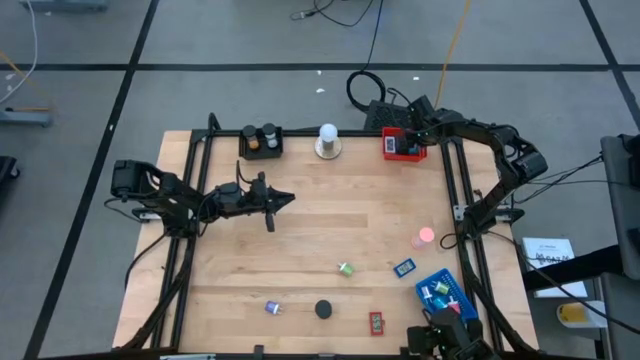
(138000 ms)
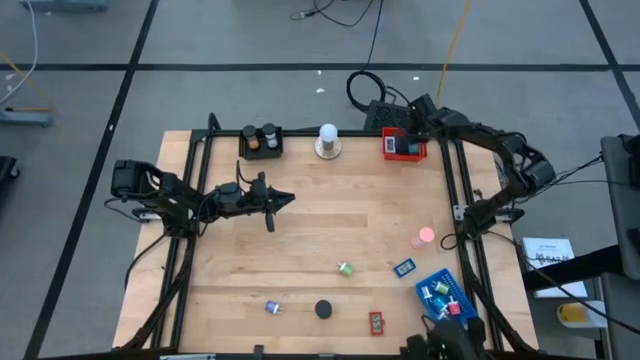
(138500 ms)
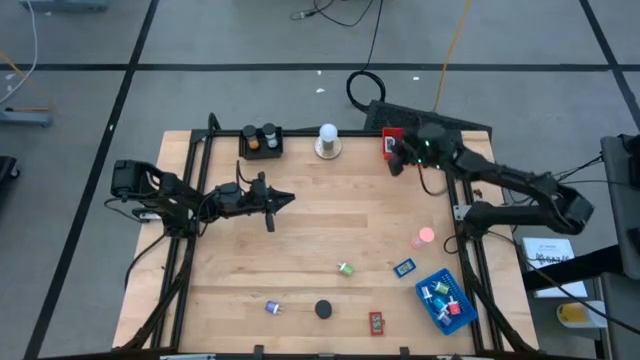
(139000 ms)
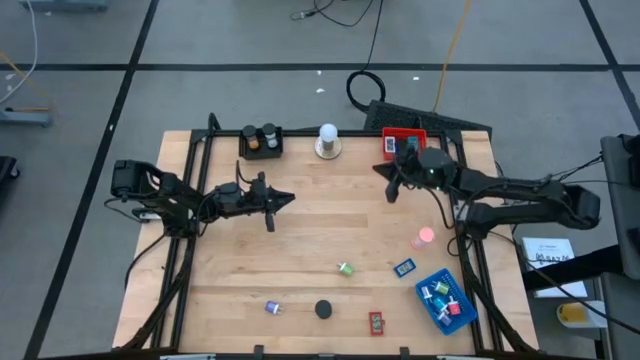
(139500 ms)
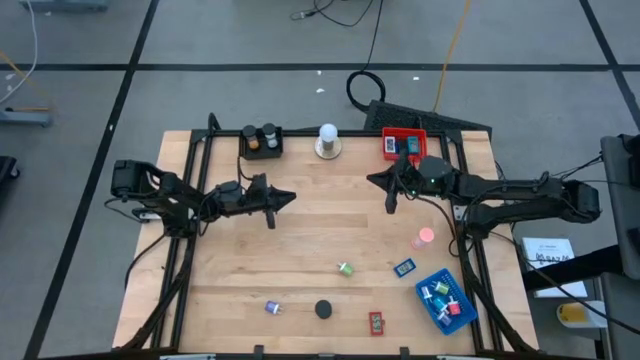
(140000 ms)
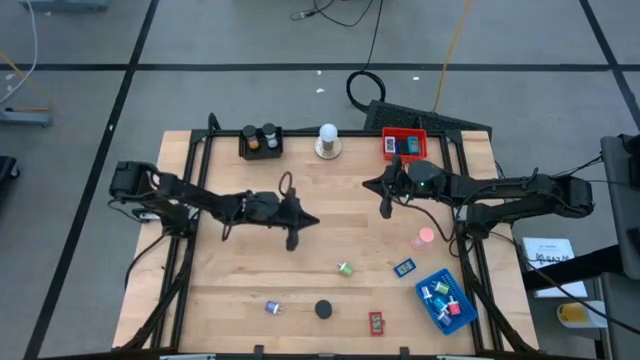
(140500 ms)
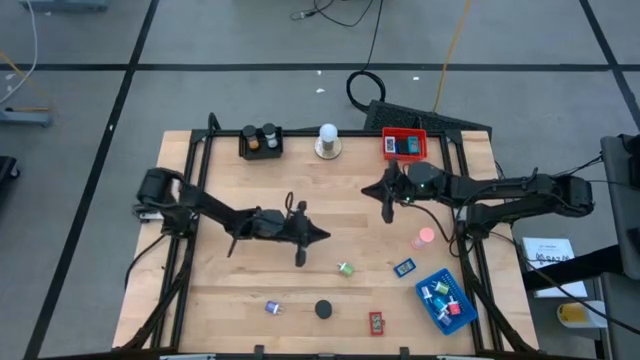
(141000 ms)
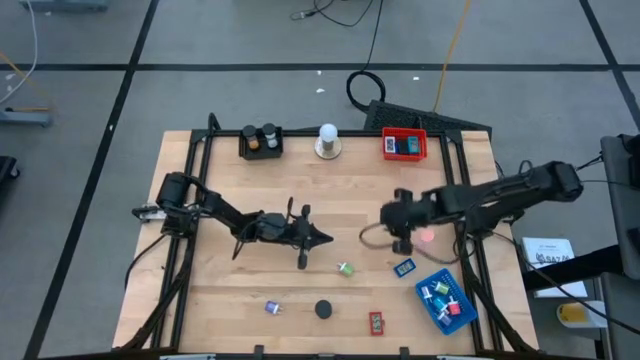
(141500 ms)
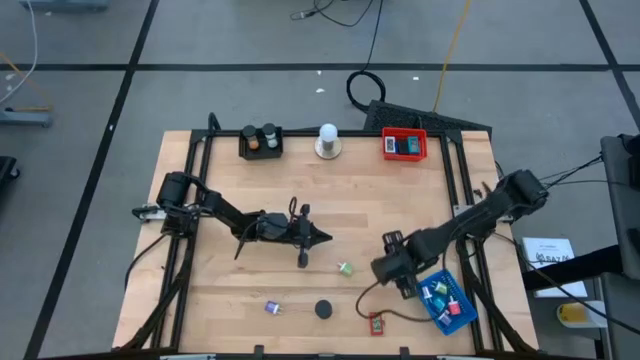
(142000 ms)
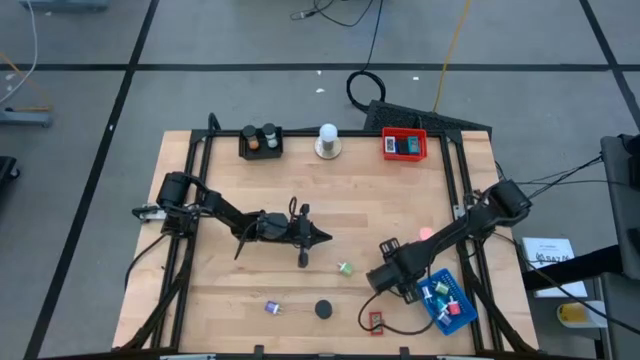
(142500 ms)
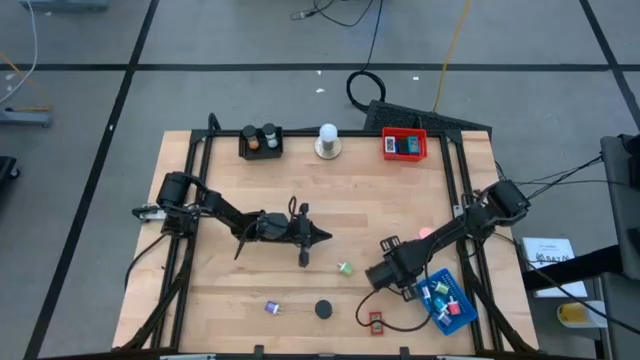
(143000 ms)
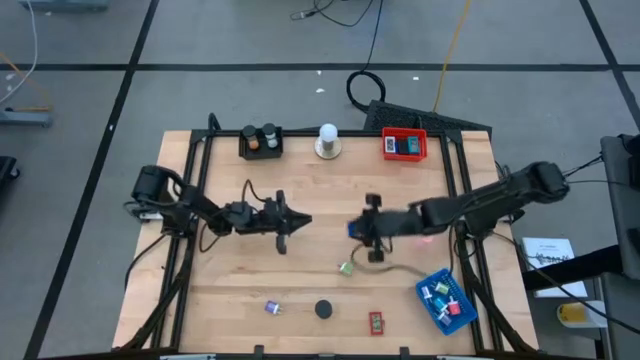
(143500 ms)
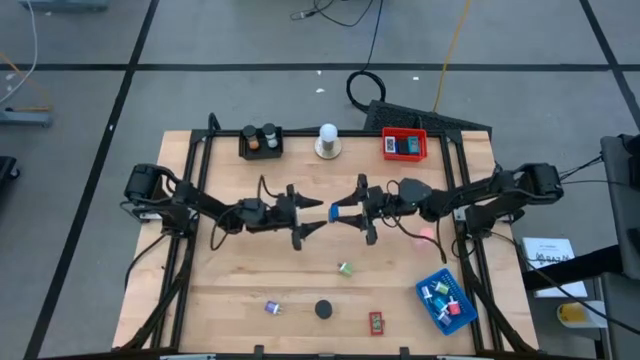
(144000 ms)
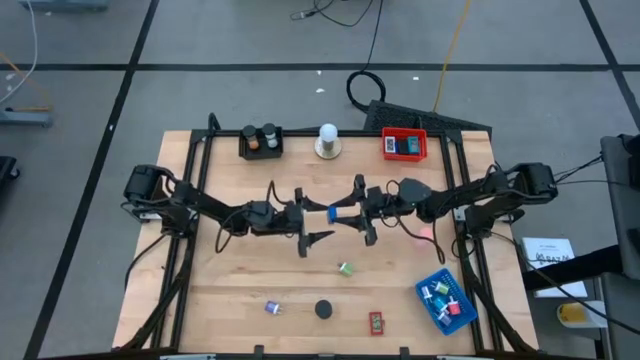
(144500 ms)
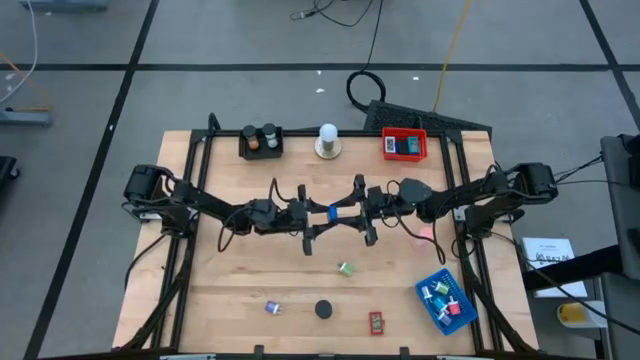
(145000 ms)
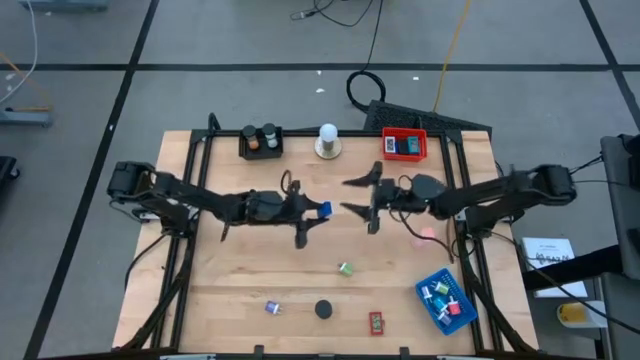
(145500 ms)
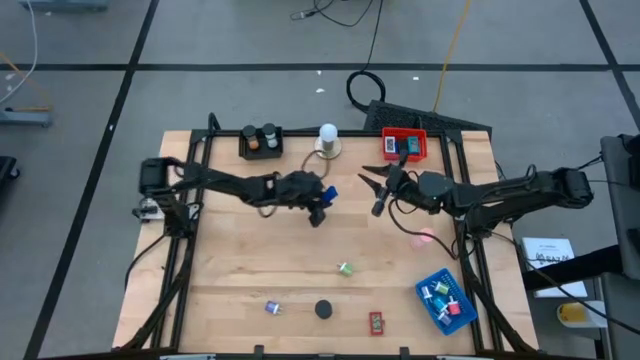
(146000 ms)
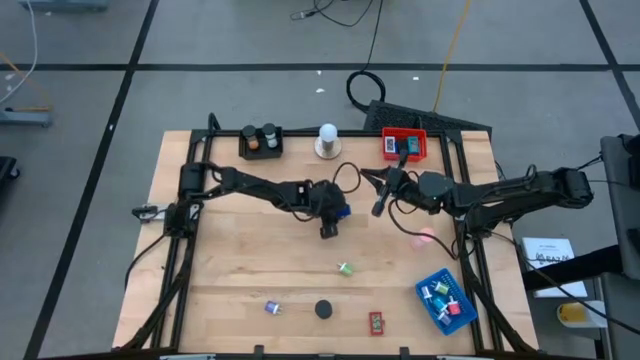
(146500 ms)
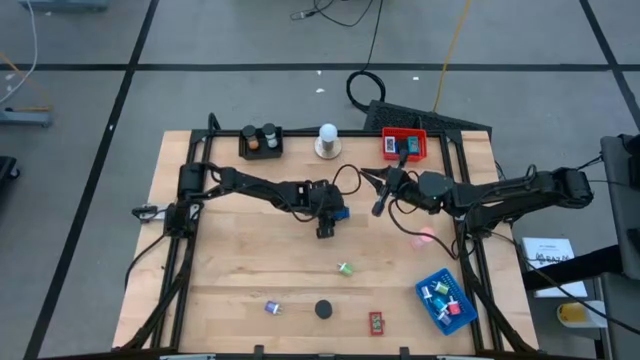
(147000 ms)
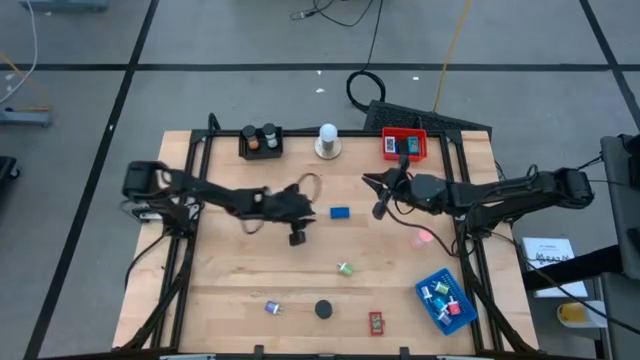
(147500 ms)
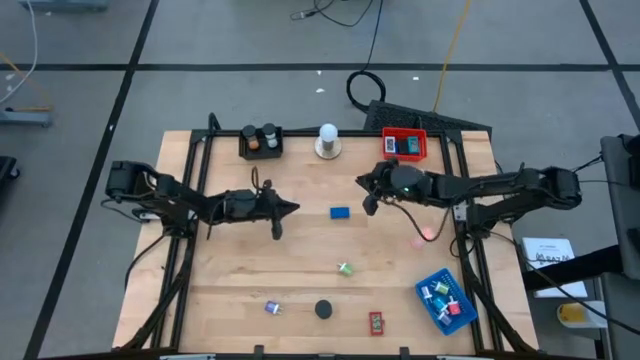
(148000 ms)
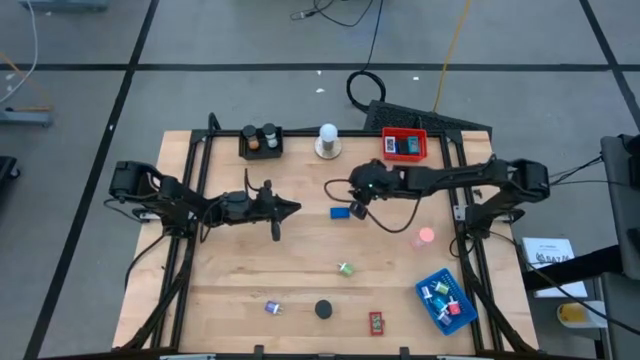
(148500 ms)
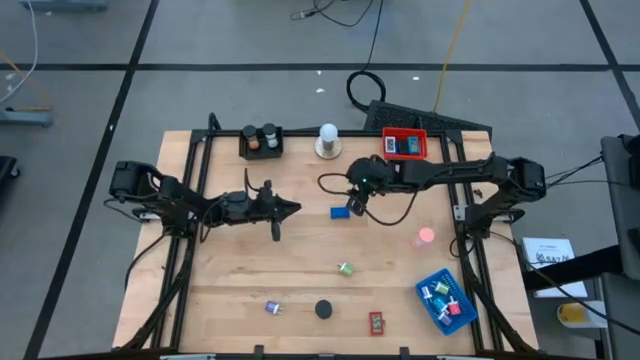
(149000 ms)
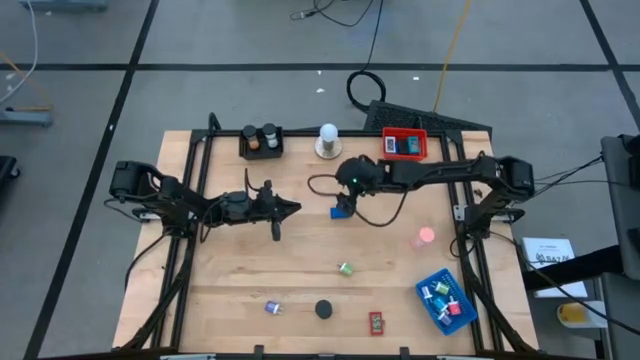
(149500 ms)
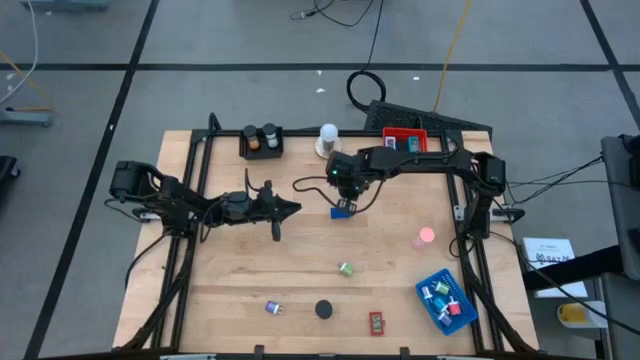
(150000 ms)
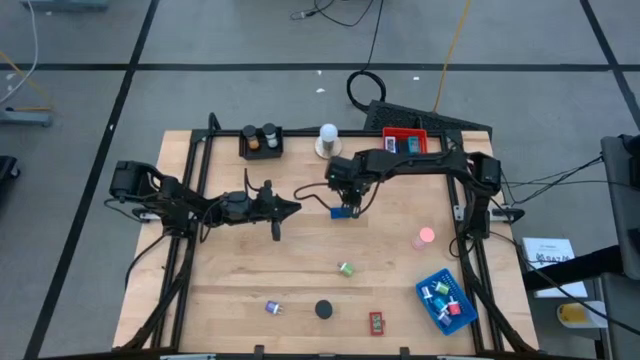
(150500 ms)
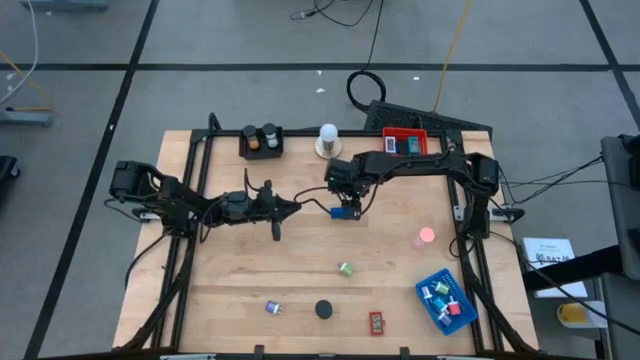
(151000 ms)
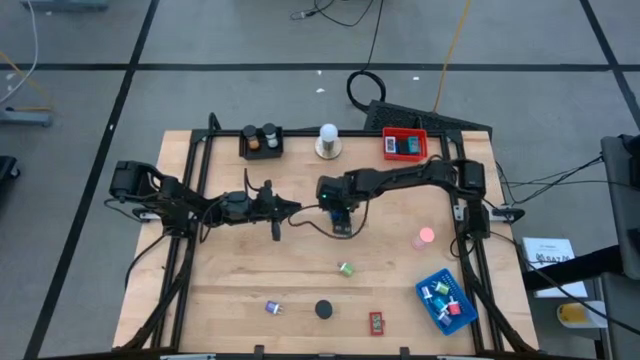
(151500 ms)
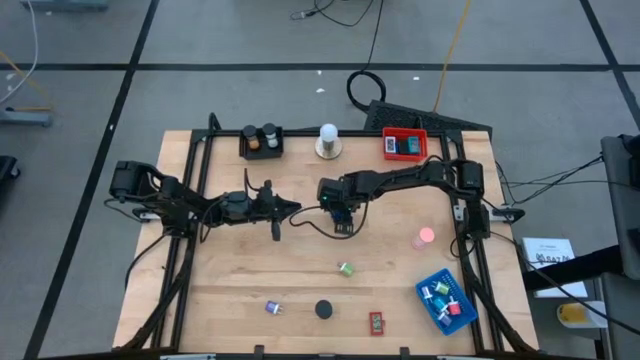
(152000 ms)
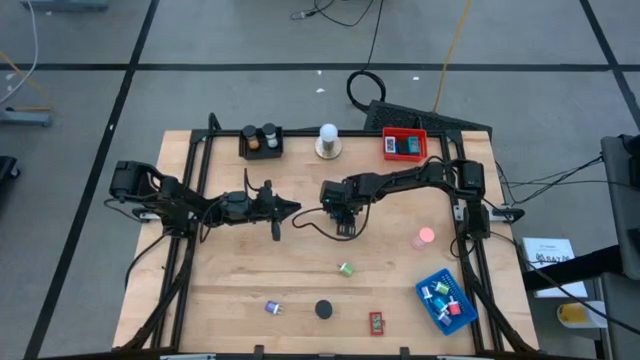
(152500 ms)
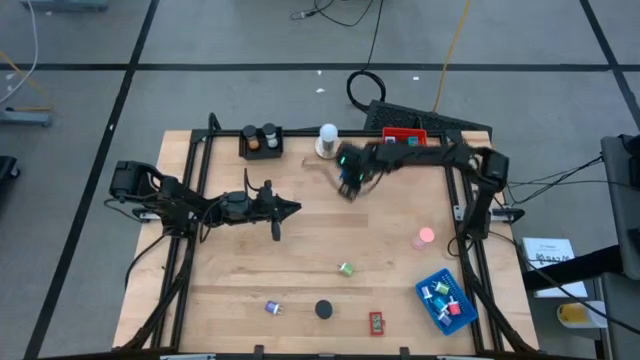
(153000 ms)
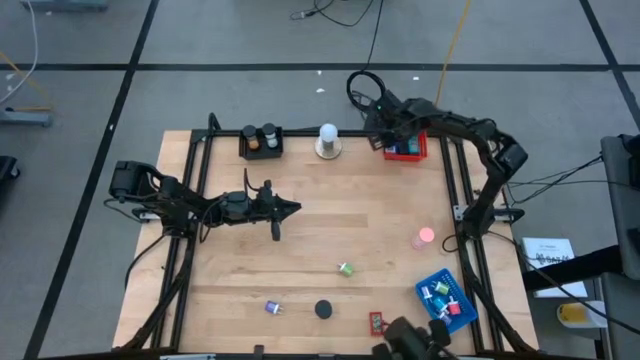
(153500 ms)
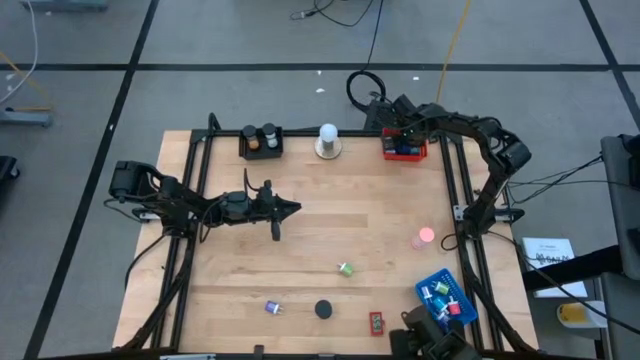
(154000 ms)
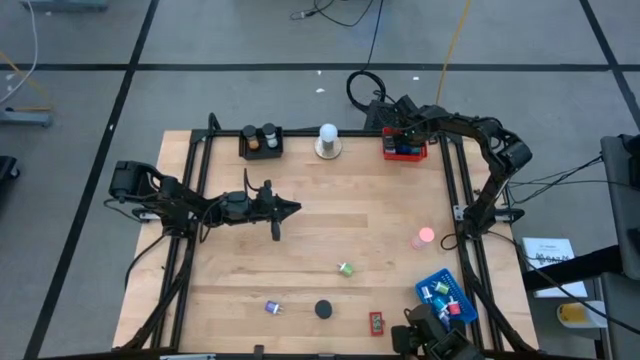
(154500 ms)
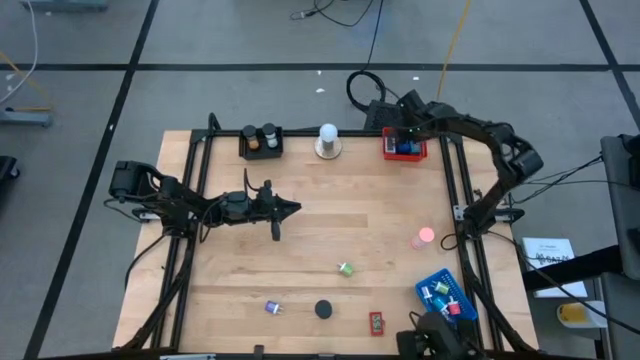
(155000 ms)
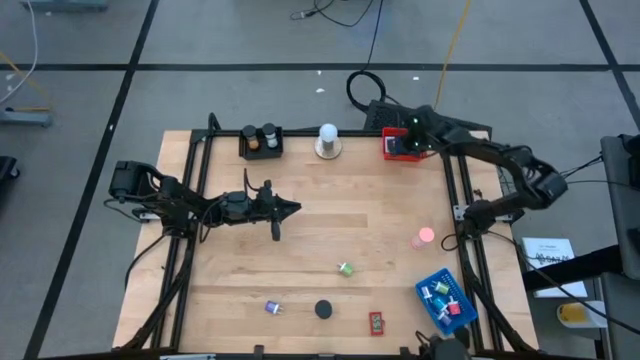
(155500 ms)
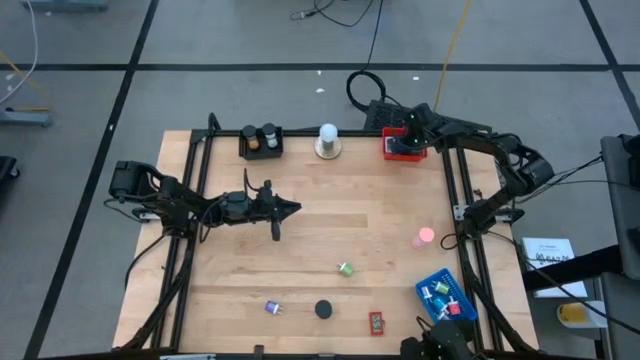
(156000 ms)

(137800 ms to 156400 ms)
Task: Pick & Place Office items
Put the blue digital timer into the red bin

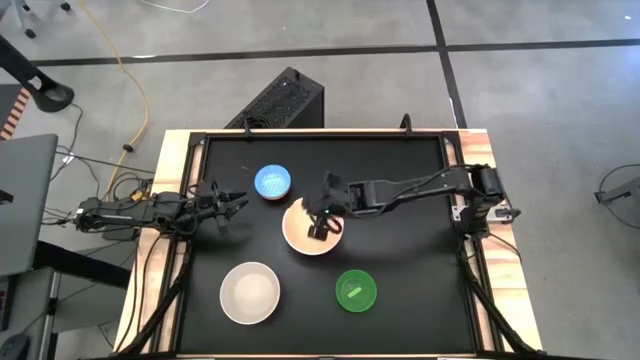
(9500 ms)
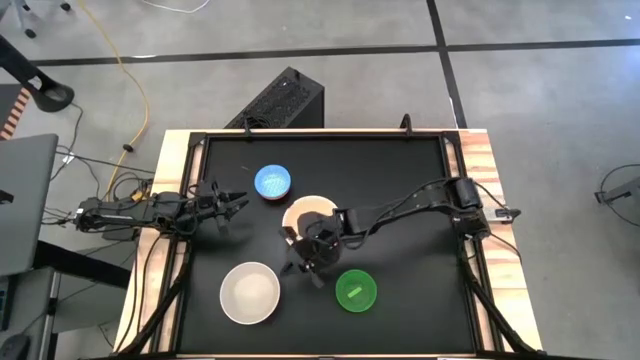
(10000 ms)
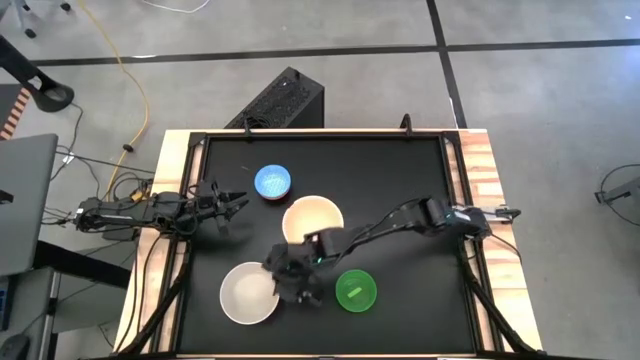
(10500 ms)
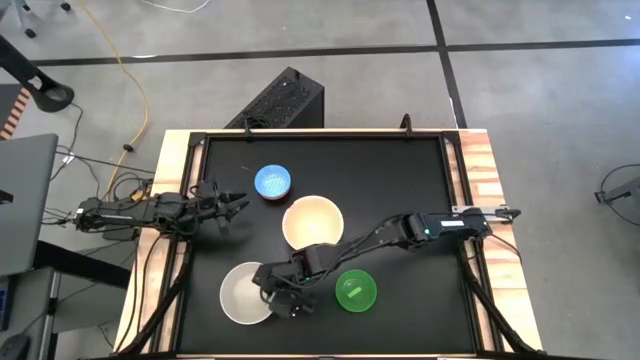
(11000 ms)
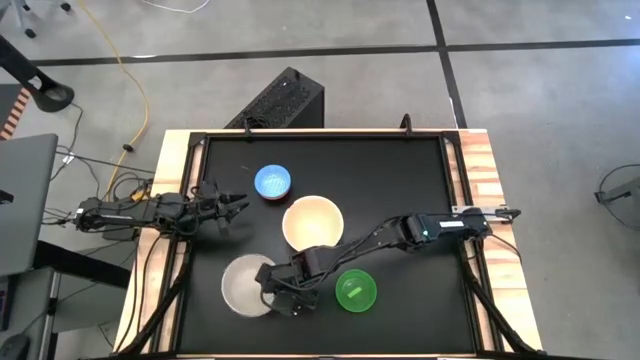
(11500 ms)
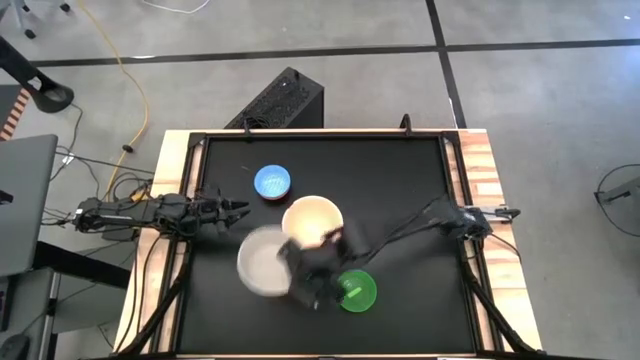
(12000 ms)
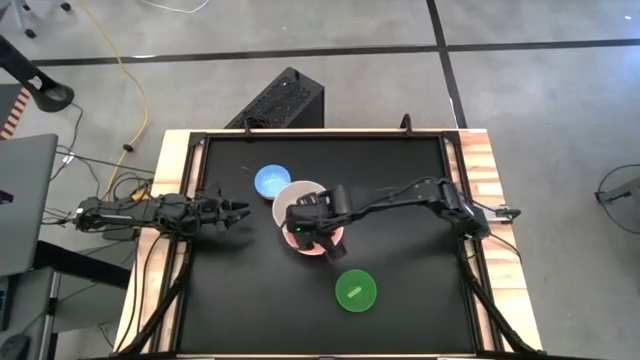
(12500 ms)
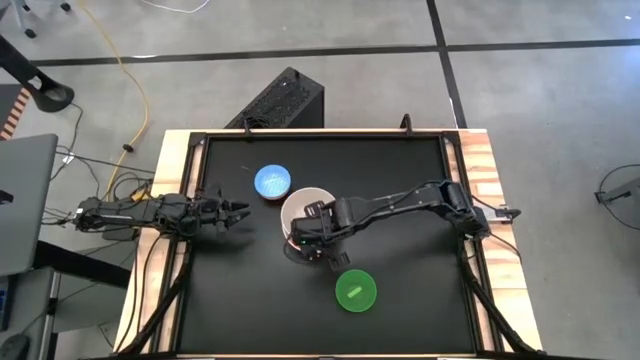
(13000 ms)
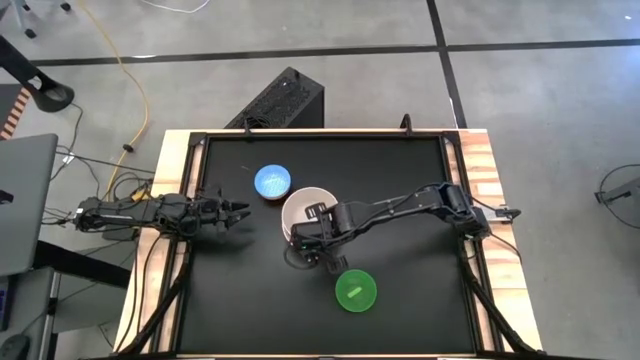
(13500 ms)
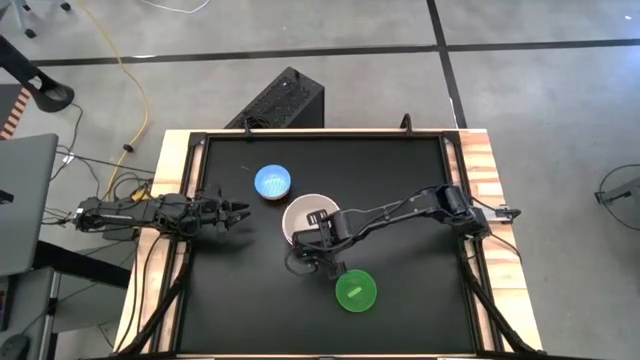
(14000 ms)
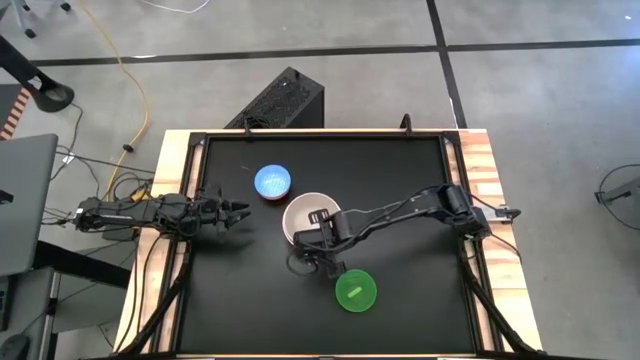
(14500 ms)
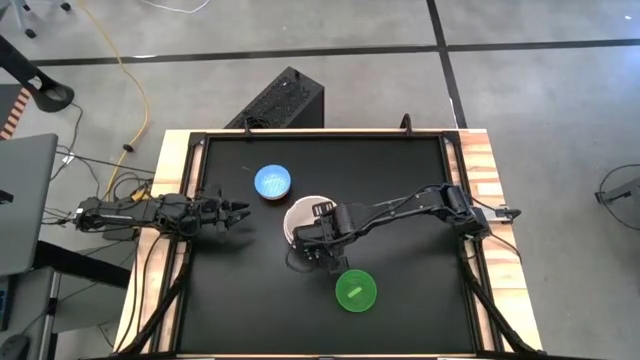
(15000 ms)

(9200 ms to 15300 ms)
Task: Nest bowls inside each other by size order
Stack the gray bowl on top of the light orange bowl
